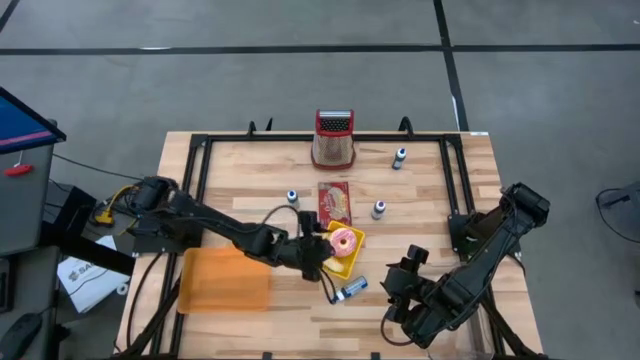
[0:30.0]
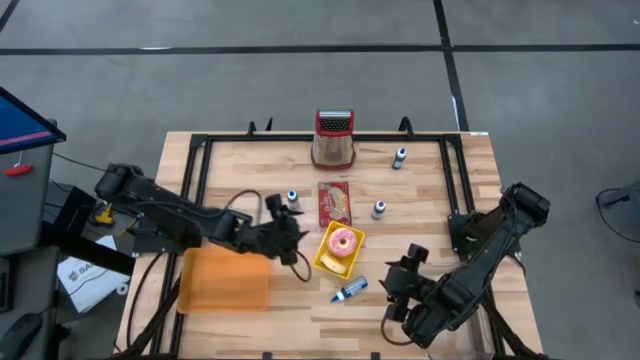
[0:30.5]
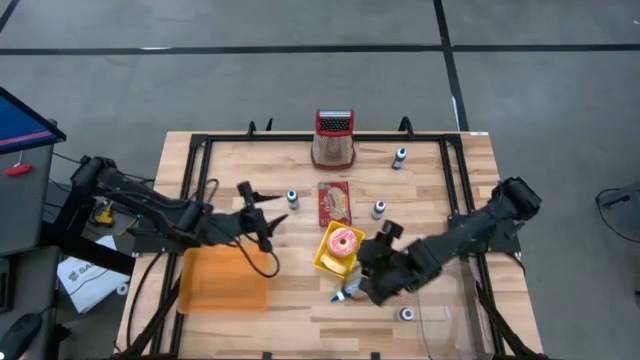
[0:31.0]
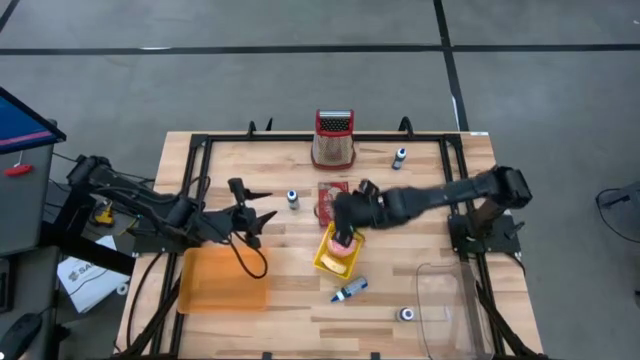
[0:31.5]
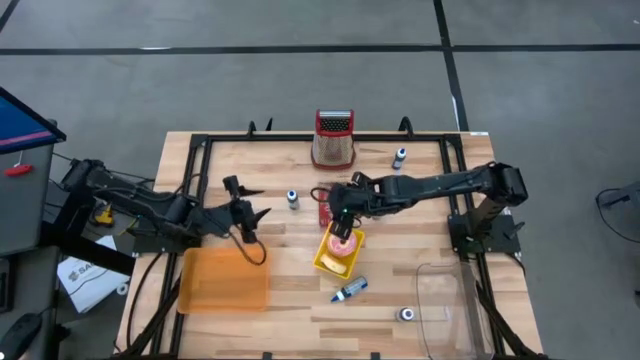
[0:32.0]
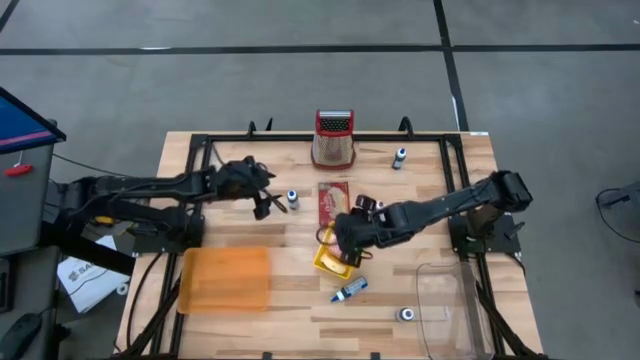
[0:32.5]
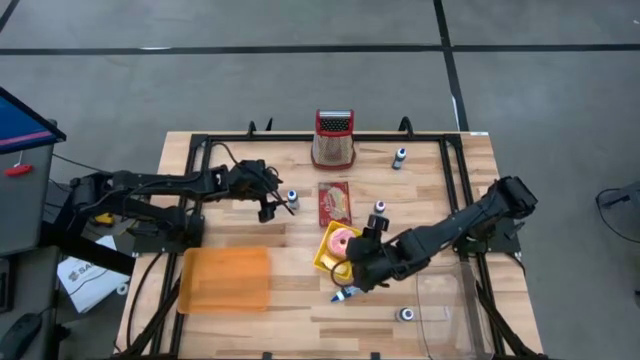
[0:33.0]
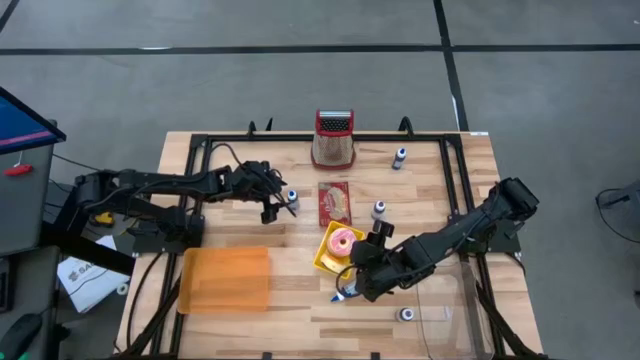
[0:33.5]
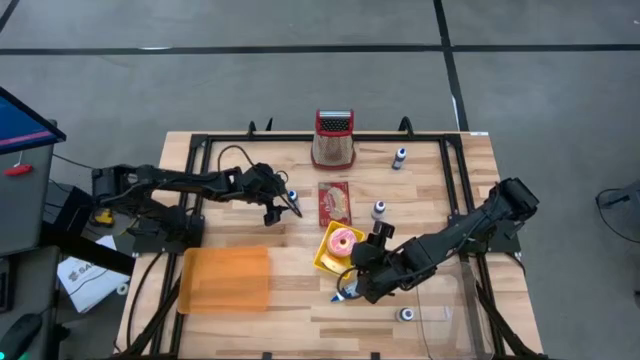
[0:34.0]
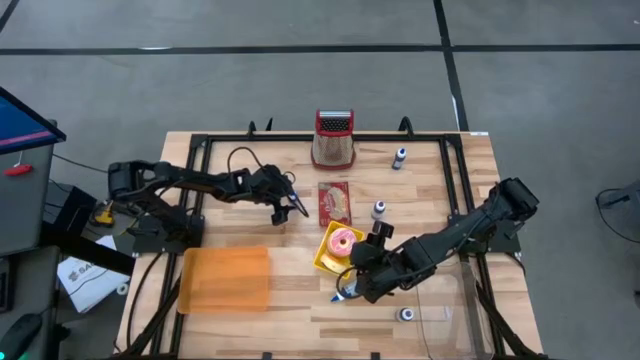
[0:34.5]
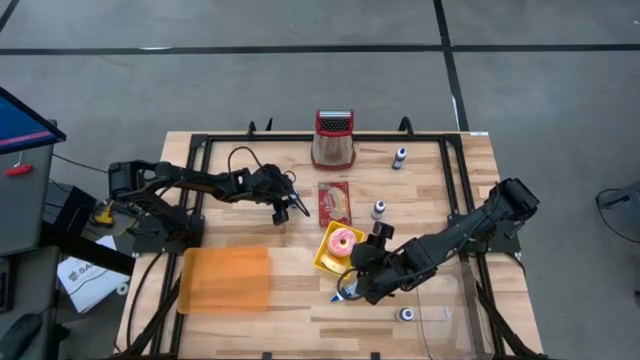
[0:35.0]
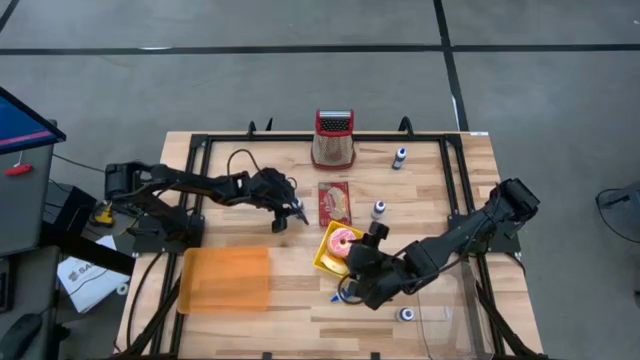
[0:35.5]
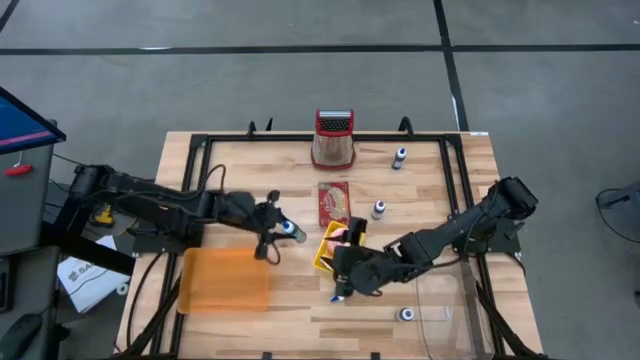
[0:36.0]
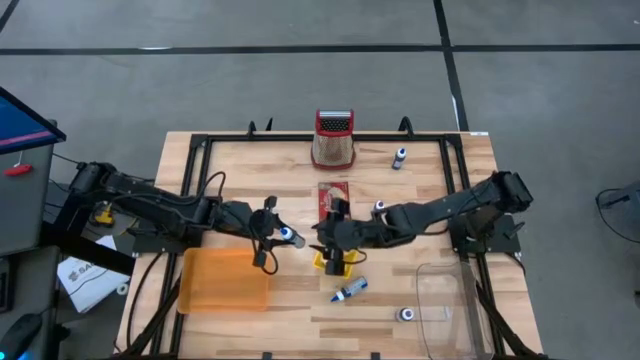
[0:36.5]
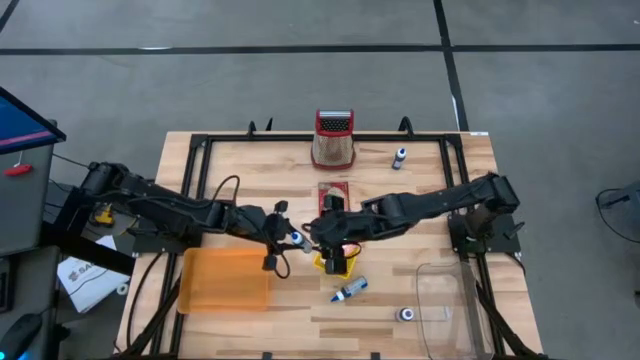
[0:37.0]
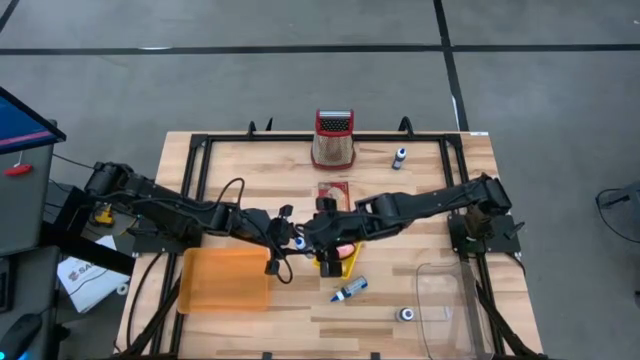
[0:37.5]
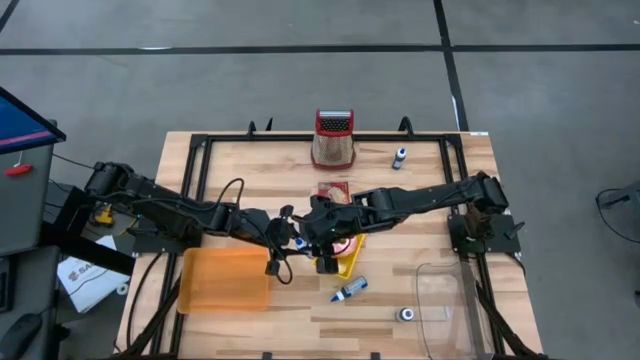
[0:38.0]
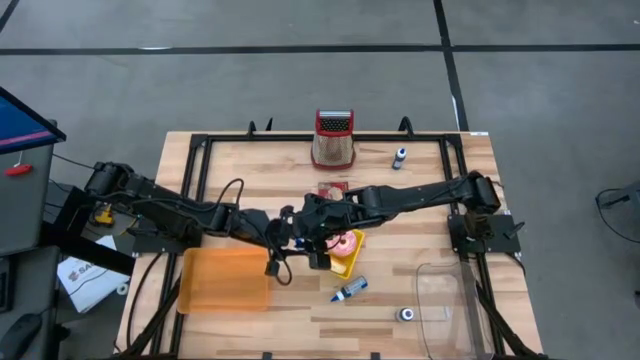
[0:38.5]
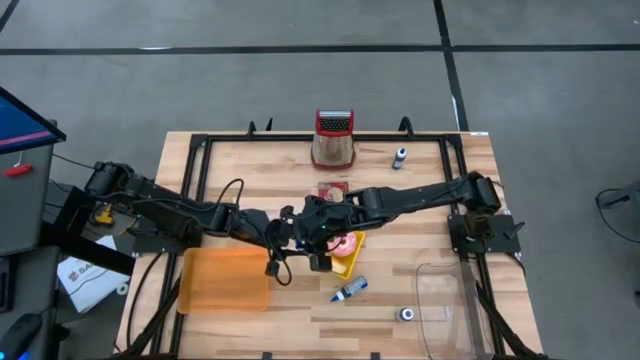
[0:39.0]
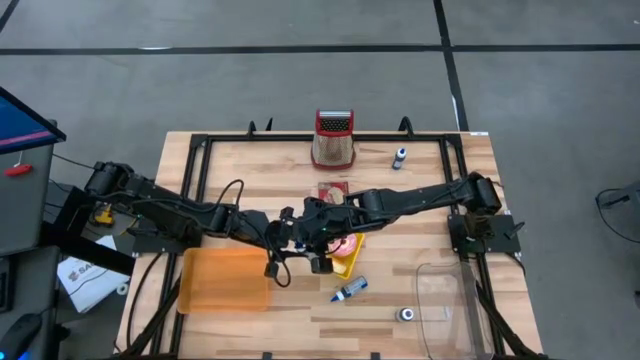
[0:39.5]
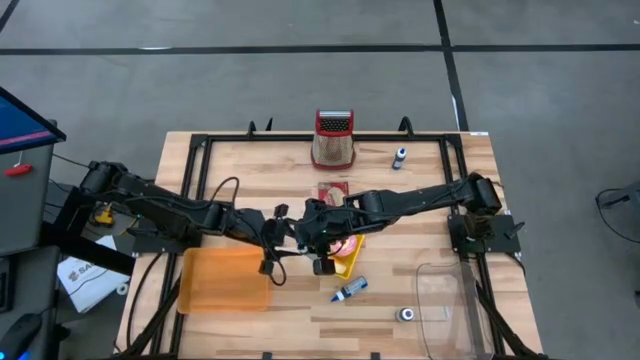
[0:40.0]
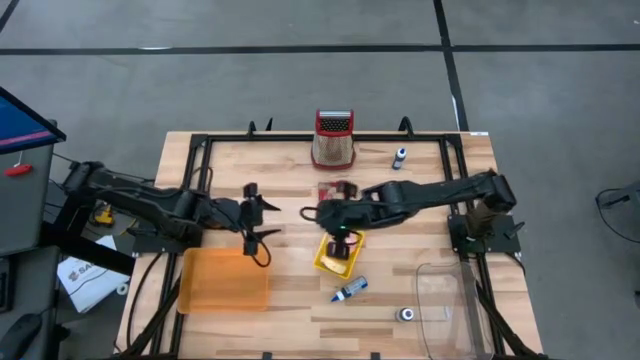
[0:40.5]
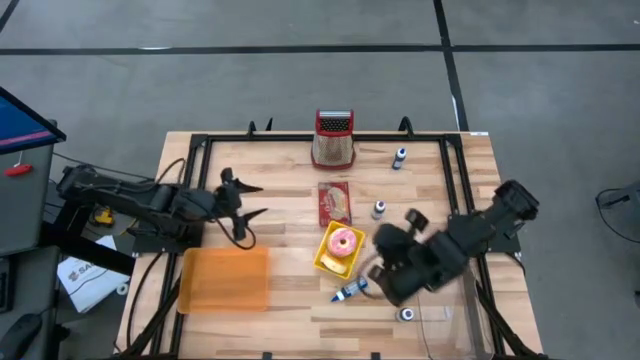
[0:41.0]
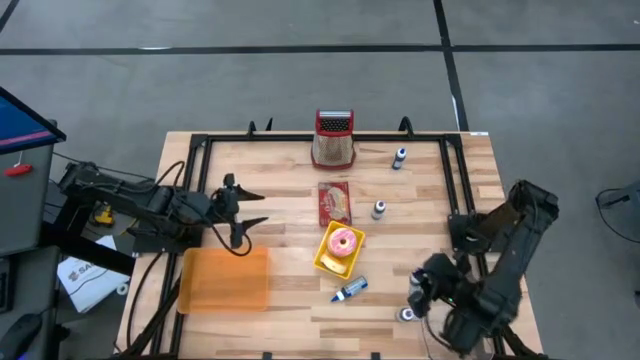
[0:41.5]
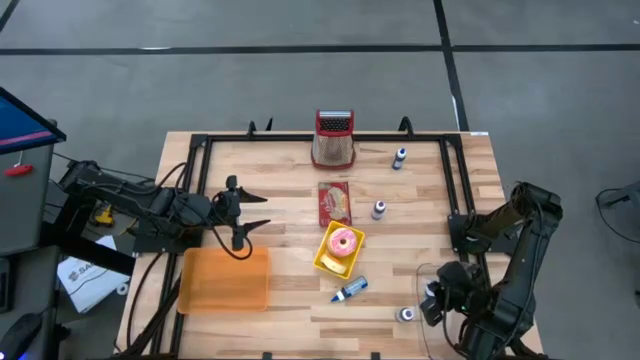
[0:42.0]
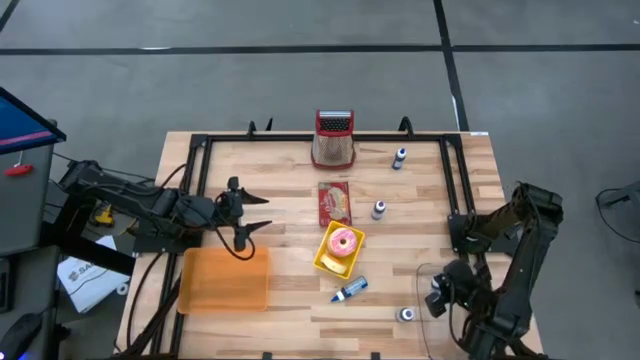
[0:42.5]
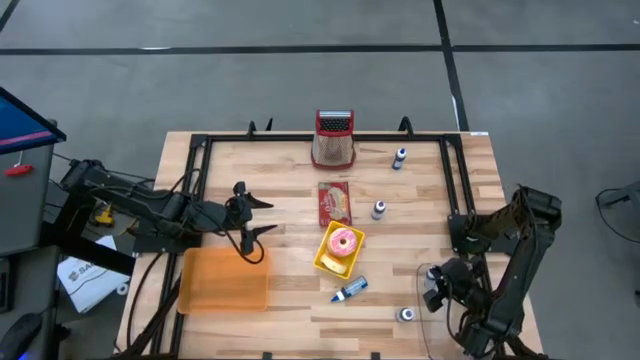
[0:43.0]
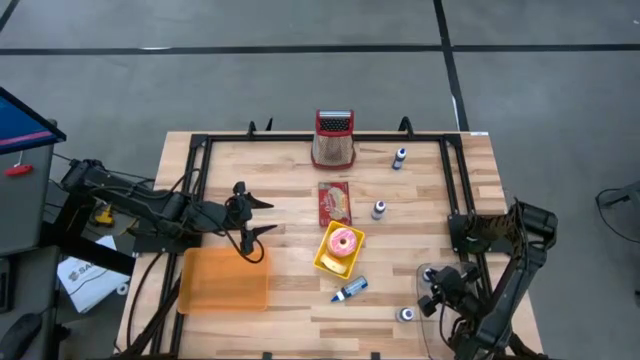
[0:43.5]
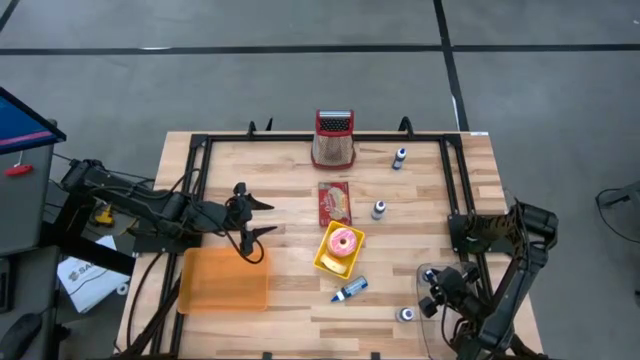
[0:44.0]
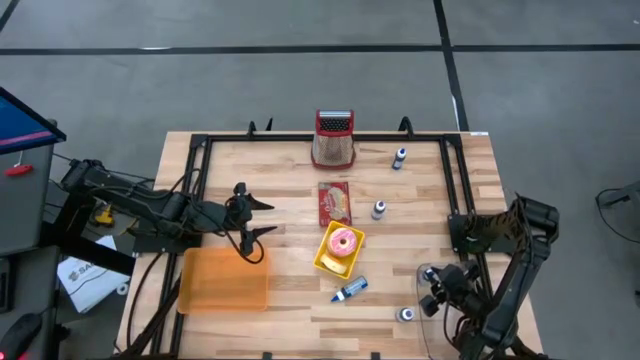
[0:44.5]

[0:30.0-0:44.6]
Put the top left blue food coloring bottle into the transparent bin

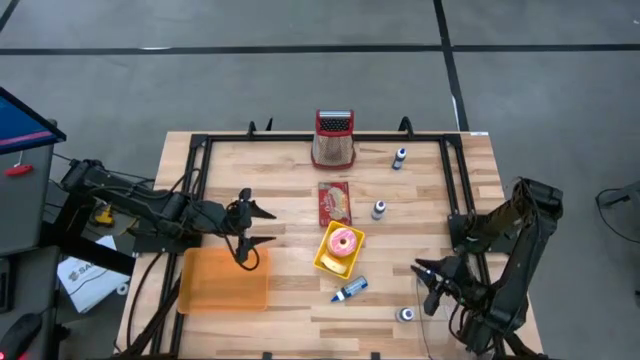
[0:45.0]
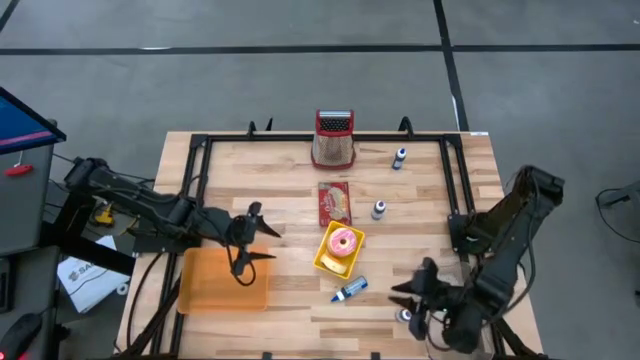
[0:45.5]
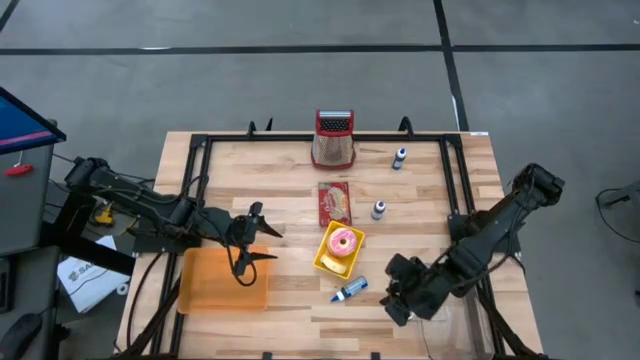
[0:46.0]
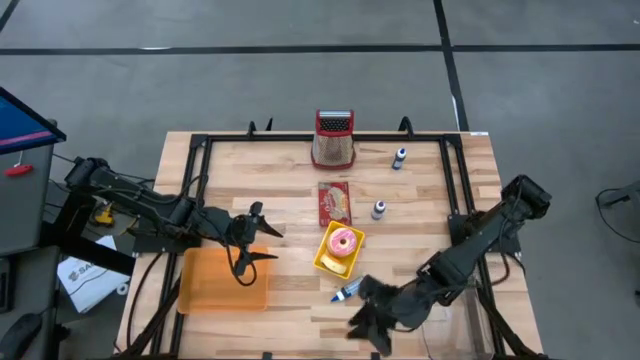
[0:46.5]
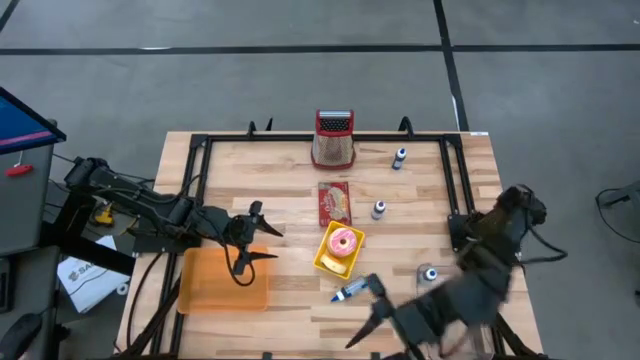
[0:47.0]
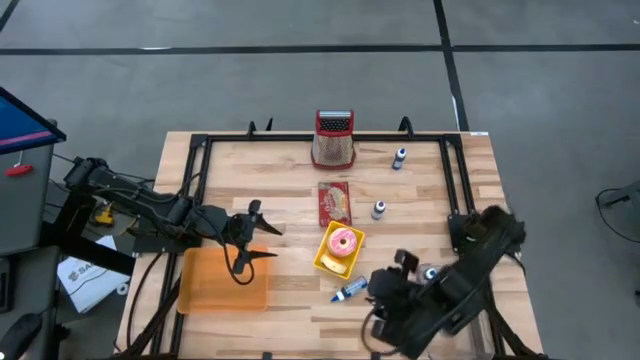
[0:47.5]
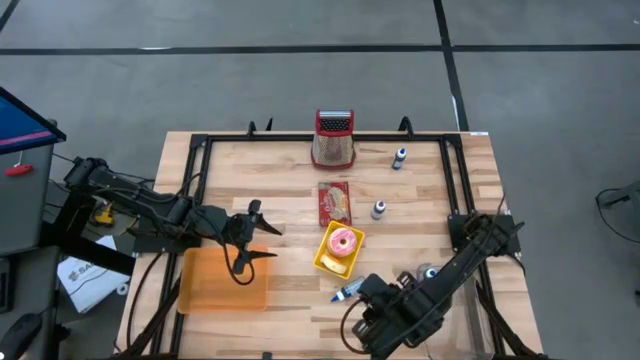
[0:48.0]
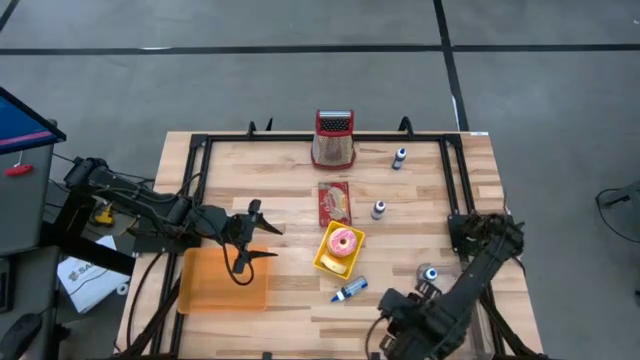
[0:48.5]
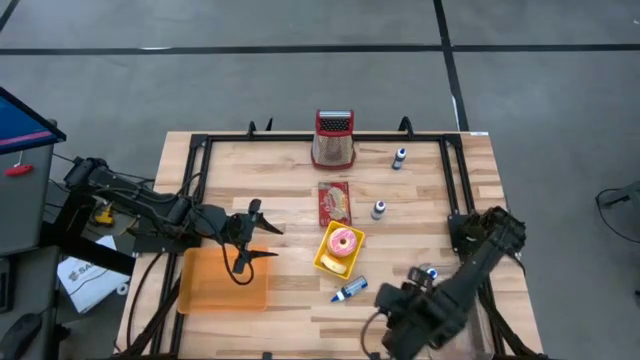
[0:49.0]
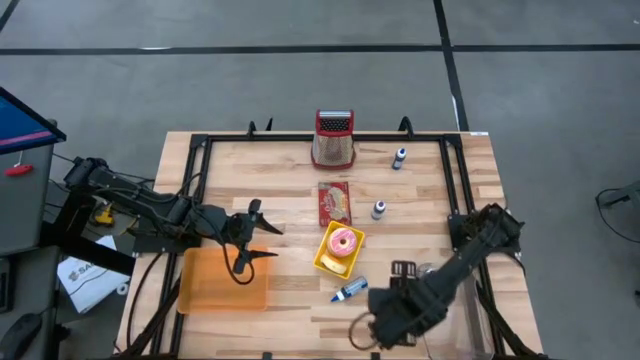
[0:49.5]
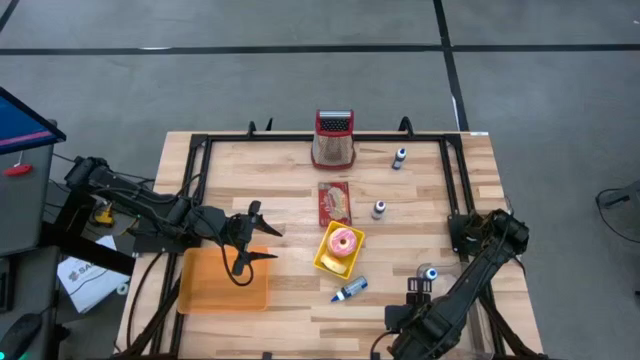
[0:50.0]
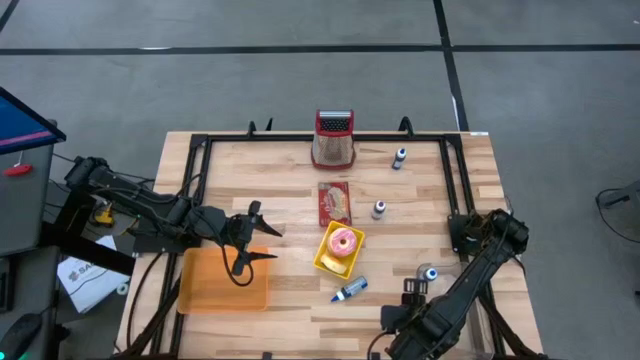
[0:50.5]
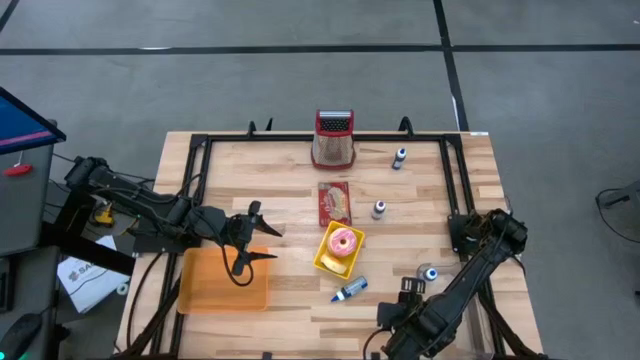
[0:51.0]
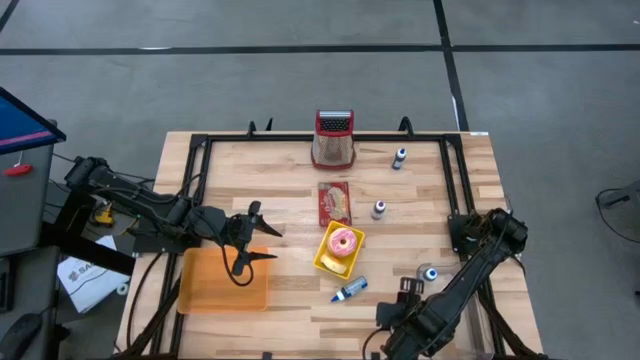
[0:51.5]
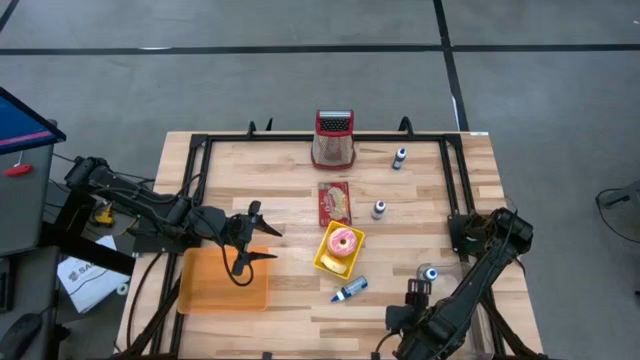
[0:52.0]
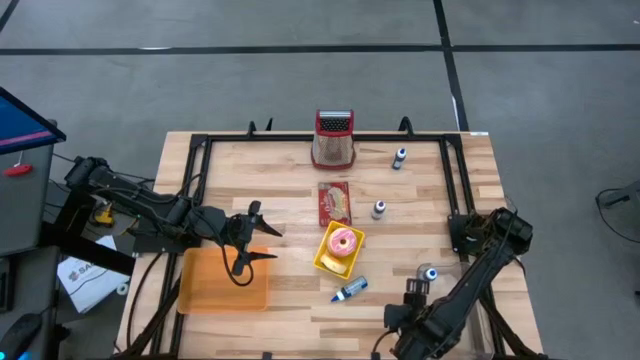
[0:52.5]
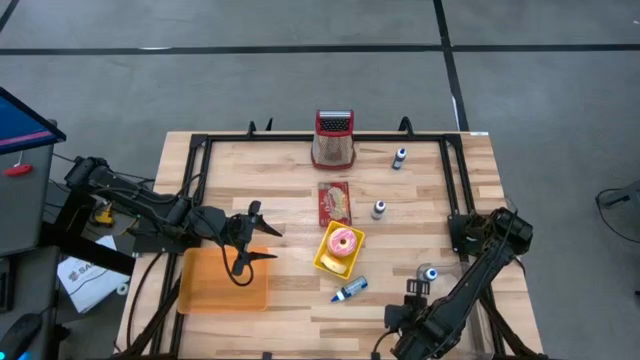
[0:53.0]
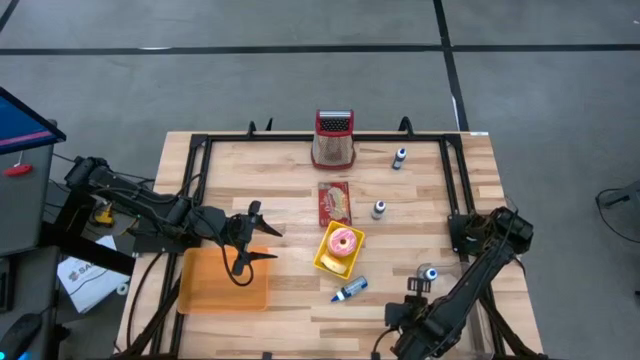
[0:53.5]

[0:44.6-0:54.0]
Put the bottom violet food coloring bottle into the transparent bin
